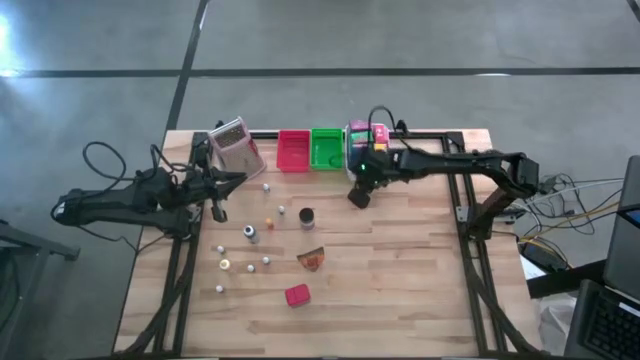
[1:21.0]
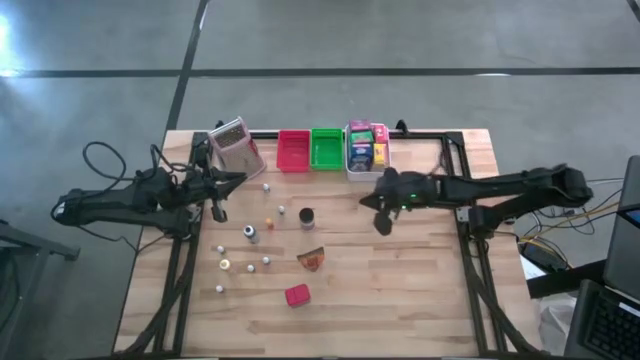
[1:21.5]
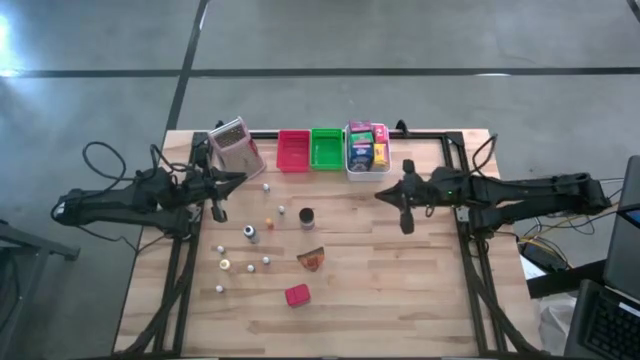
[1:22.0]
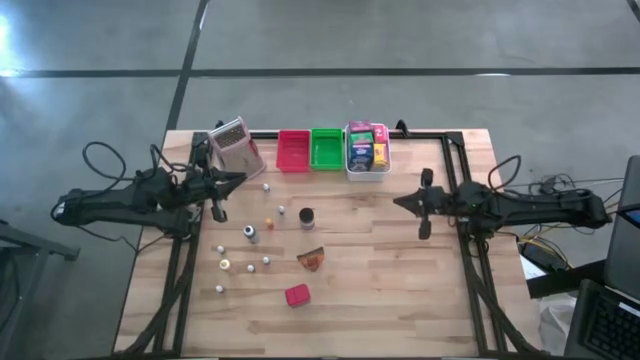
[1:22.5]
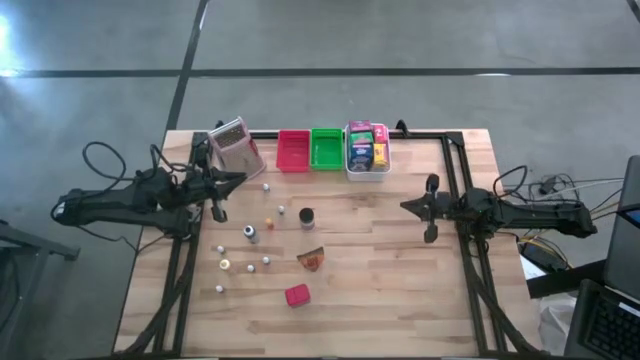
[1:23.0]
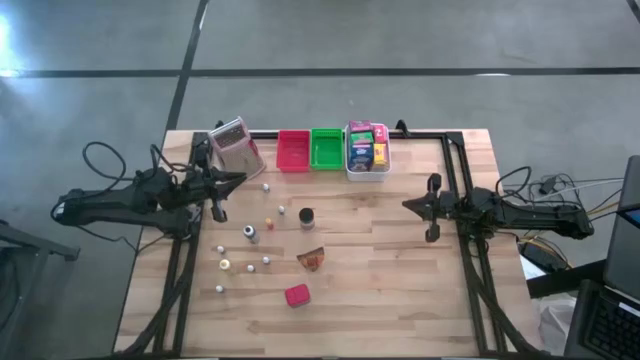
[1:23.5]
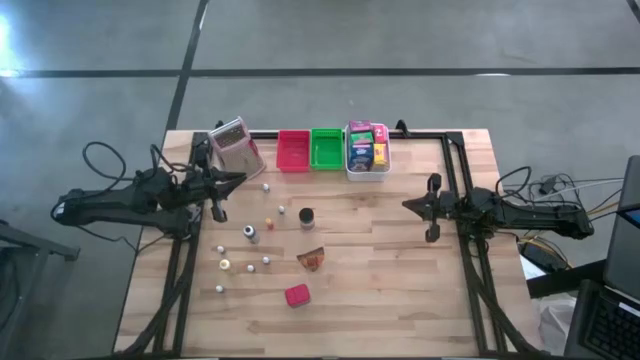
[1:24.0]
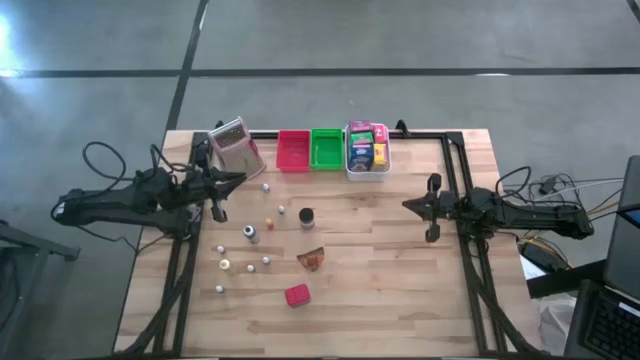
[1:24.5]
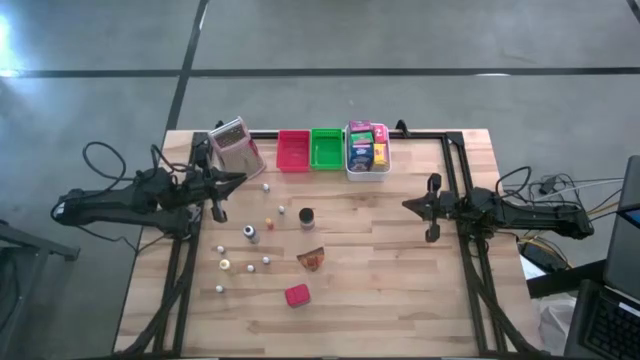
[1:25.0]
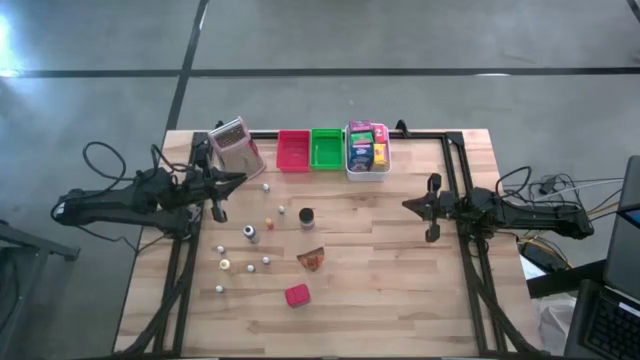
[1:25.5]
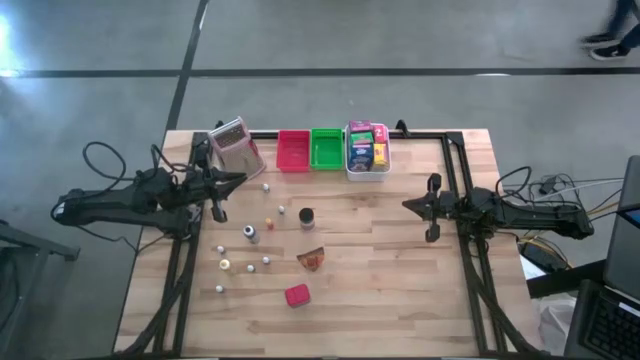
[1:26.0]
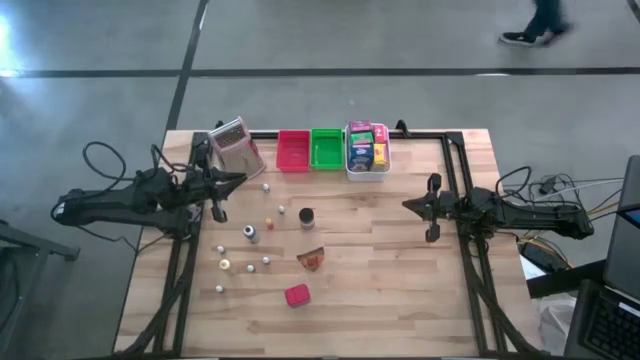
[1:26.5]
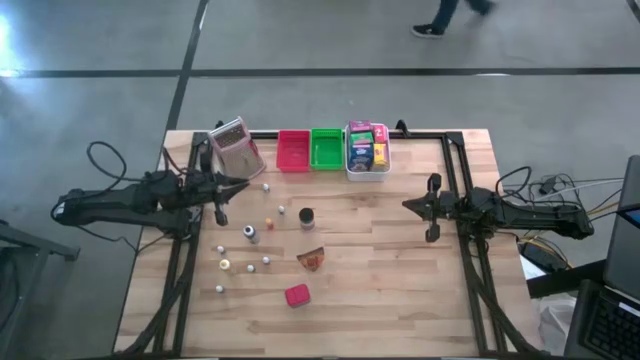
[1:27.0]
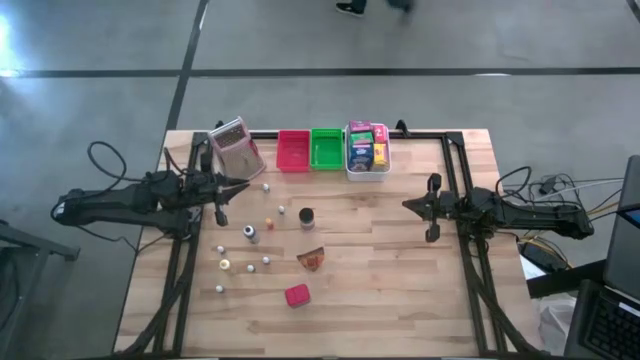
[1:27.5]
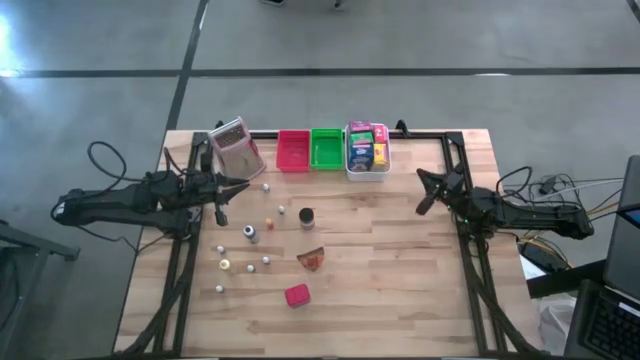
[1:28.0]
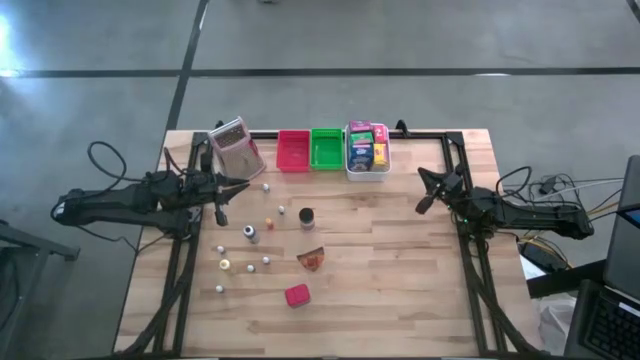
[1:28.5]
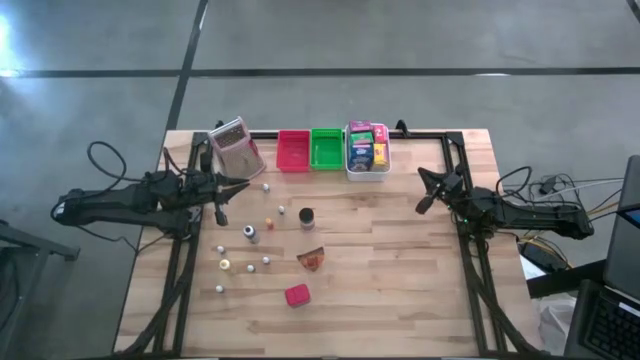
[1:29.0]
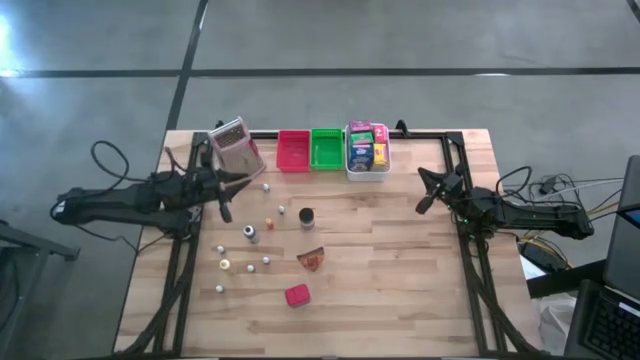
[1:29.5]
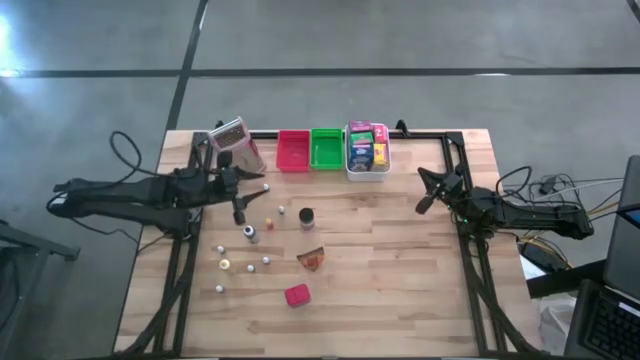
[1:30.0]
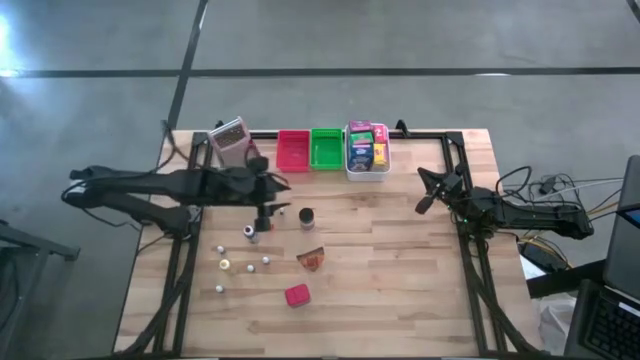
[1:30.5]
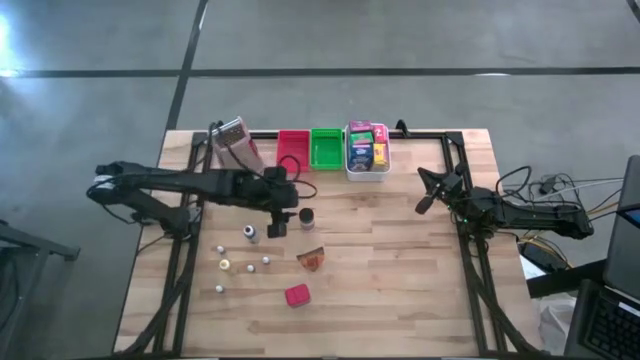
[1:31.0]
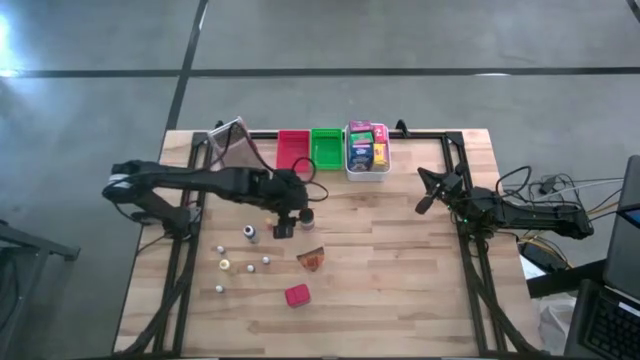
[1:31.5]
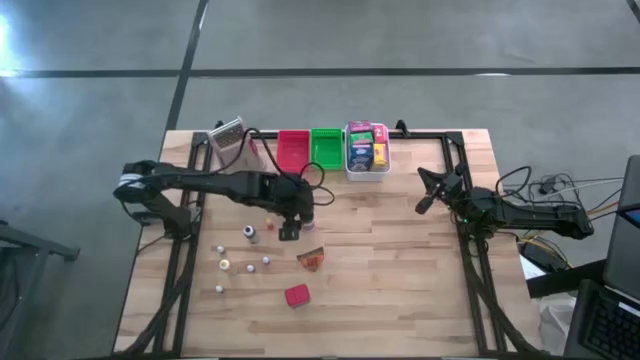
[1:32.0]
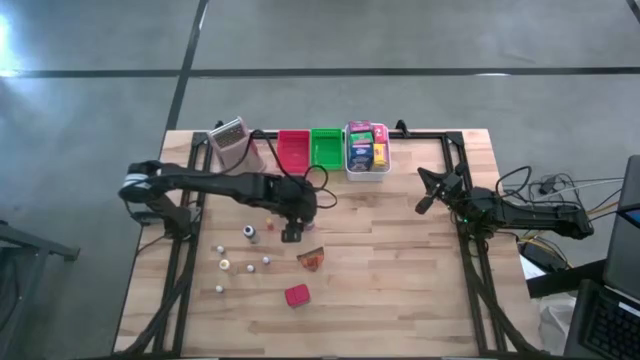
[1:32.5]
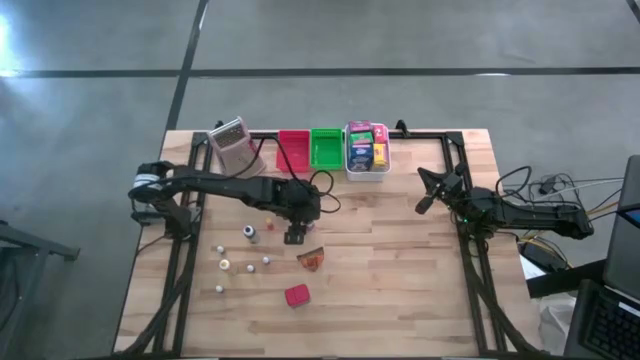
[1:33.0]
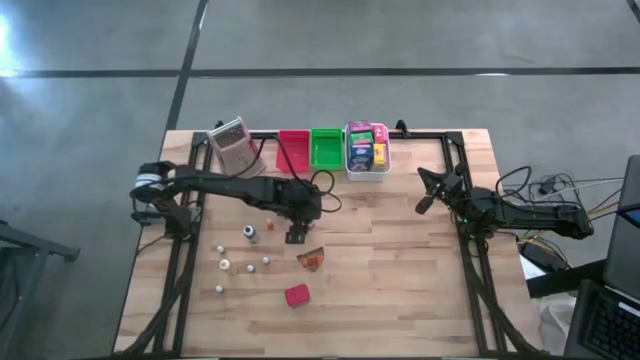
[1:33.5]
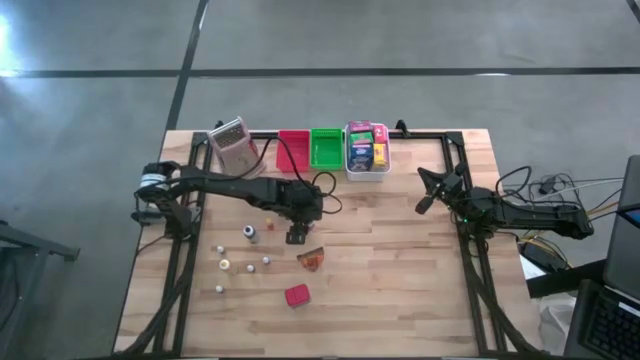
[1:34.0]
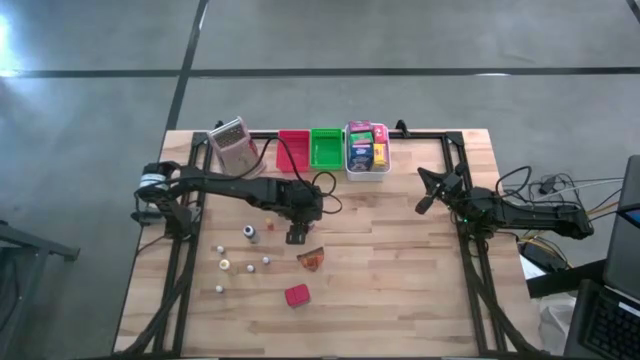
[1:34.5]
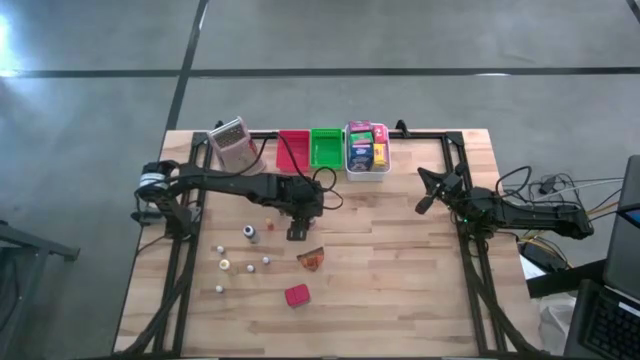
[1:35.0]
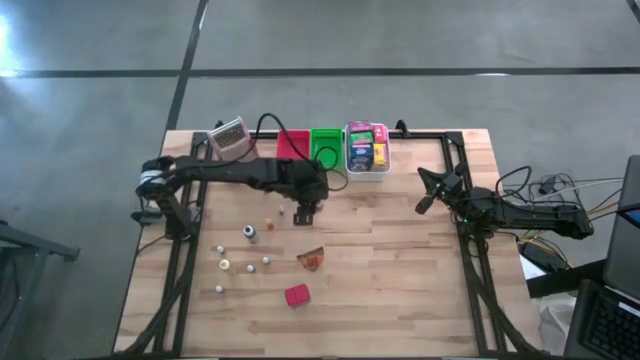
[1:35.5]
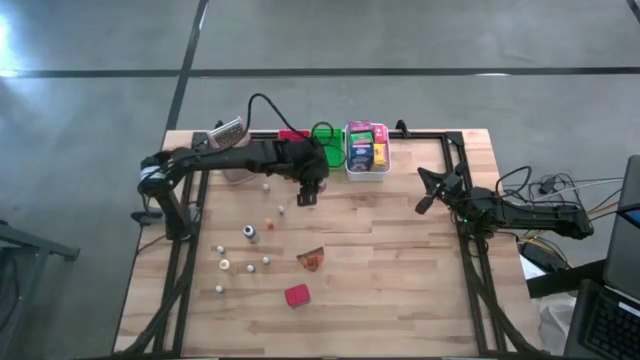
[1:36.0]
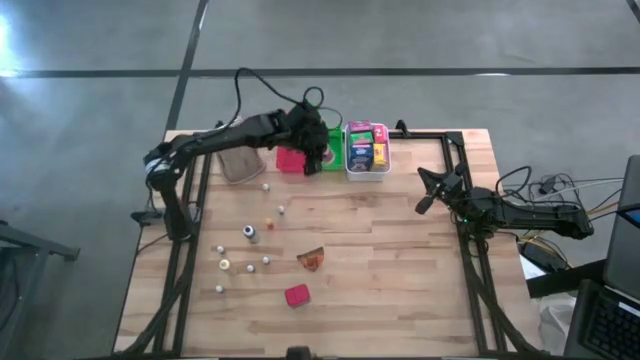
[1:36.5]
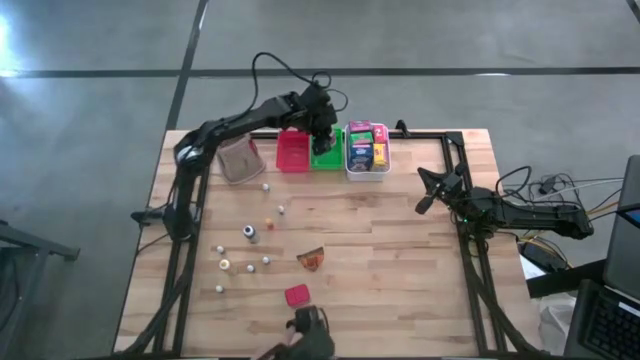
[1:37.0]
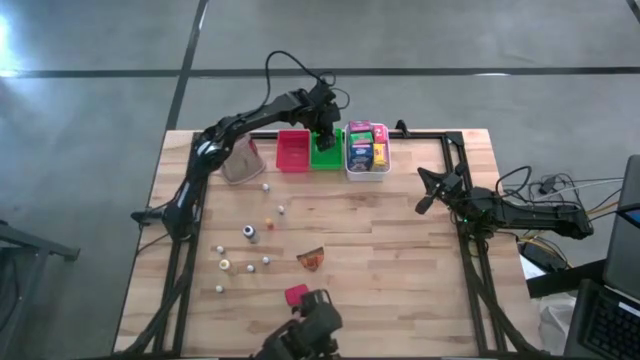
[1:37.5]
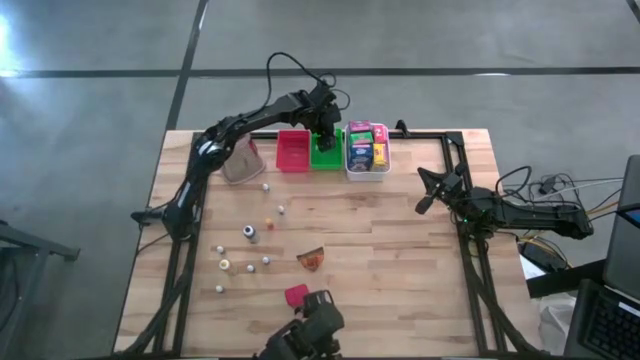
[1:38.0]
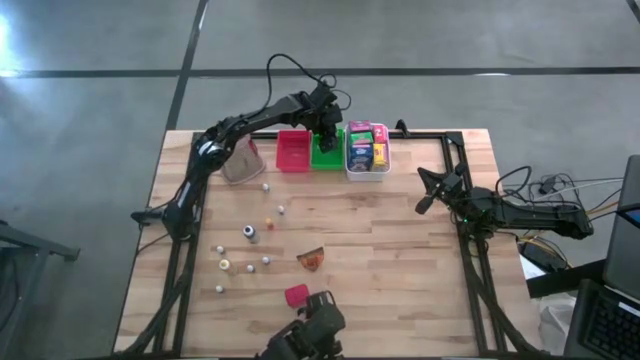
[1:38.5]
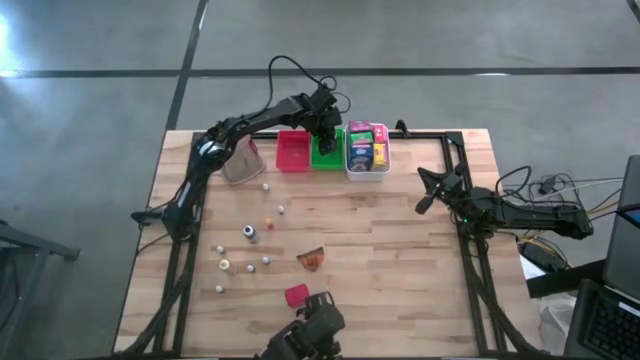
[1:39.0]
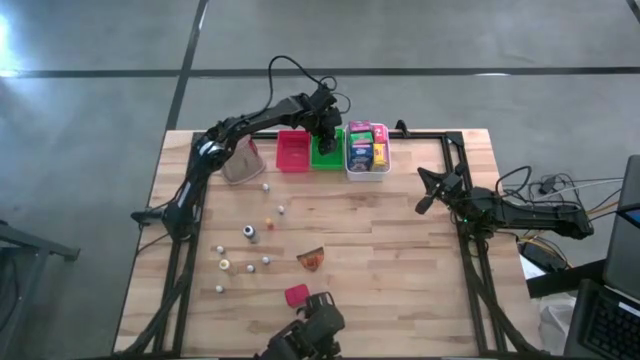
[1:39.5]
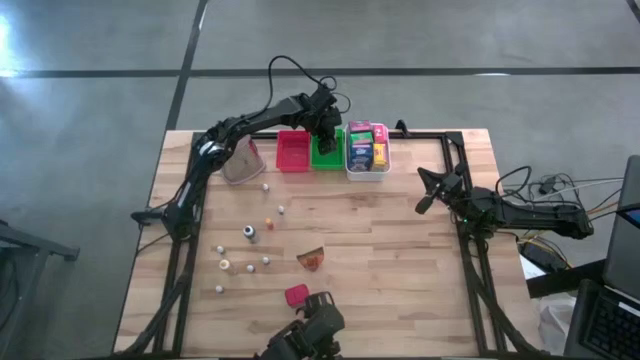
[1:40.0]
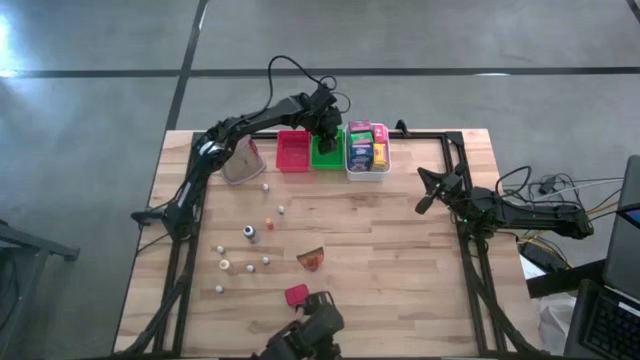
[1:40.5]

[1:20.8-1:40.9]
Task: Pick & Place Kitchen Items
Put the purple seasoning bottle into the green bin

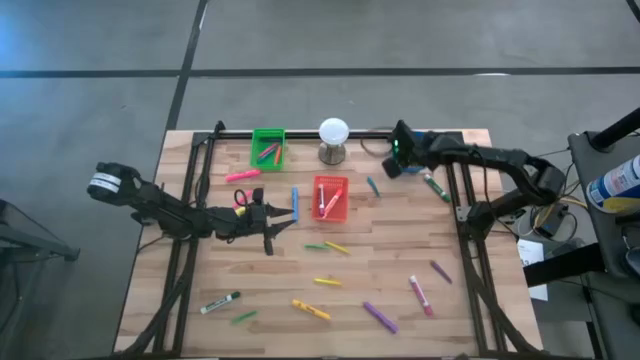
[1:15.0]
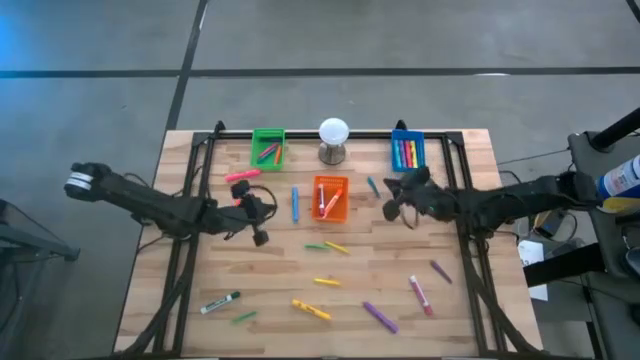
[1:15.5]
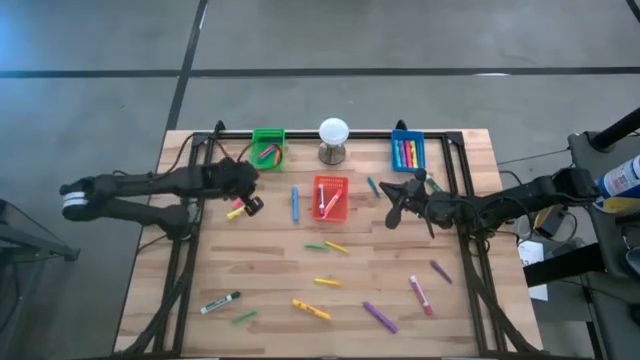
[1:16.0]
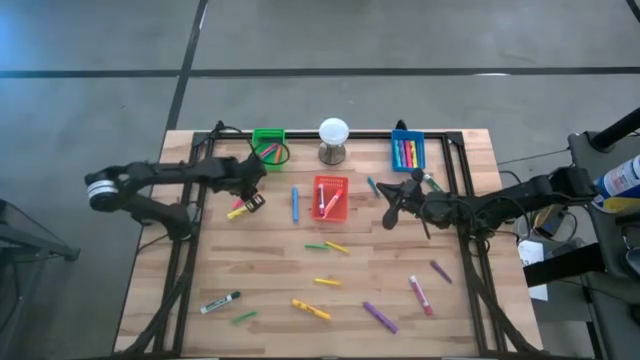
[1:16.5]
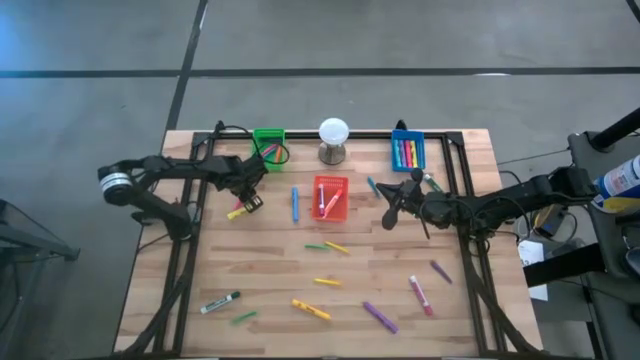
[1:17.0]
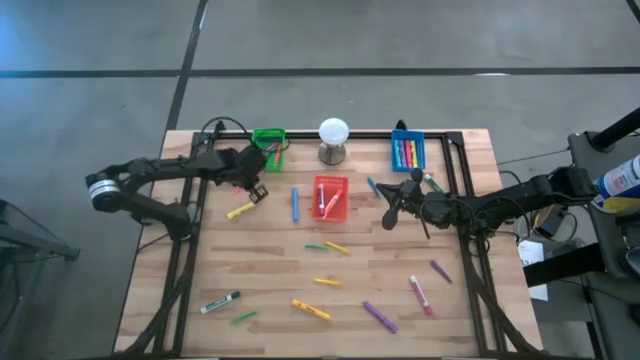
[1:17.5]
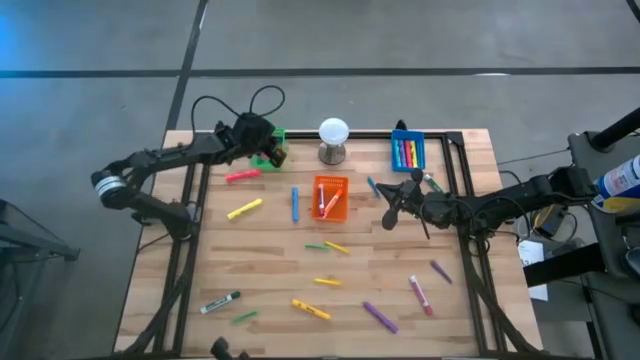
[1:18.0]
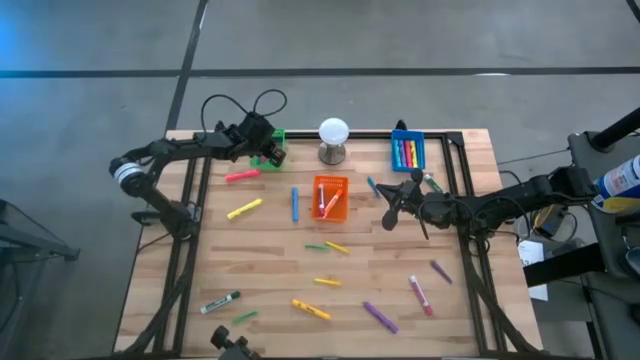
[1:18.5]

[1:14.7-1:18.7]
Task: Pick & Place Markers
Put the pink pen into the green bin
